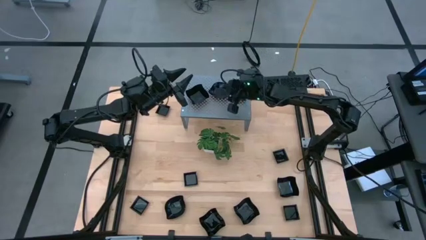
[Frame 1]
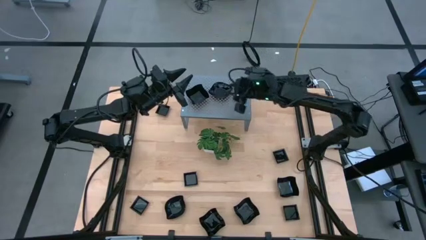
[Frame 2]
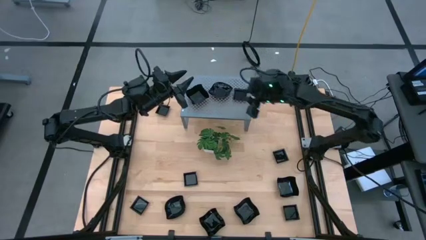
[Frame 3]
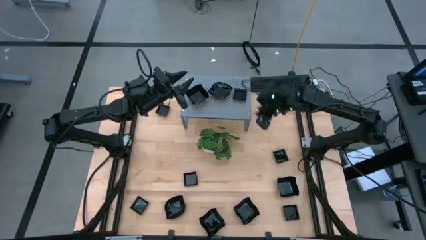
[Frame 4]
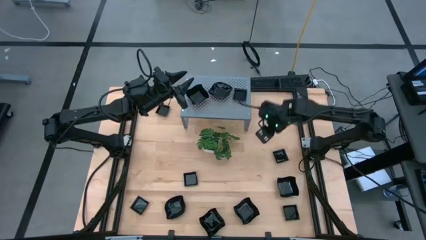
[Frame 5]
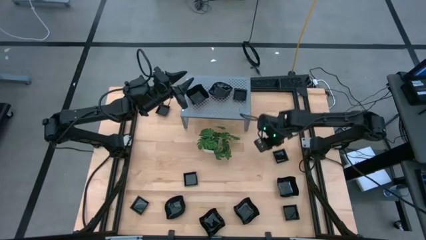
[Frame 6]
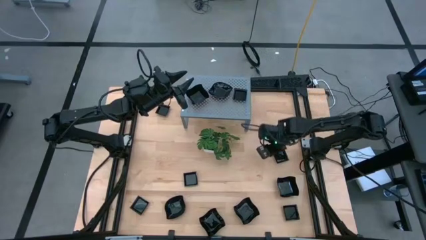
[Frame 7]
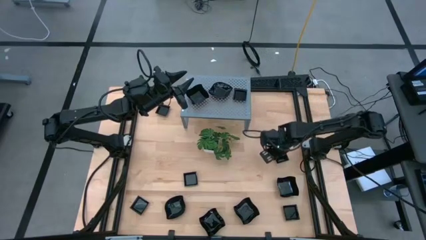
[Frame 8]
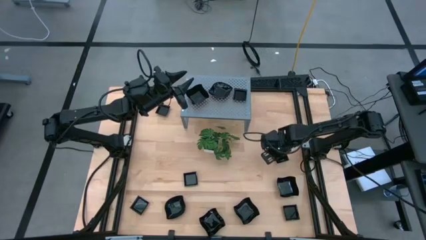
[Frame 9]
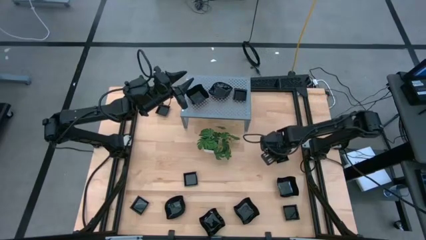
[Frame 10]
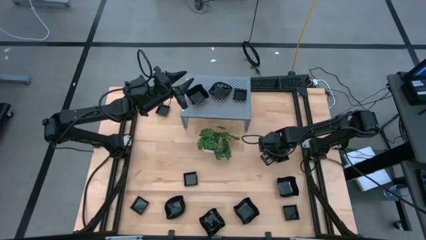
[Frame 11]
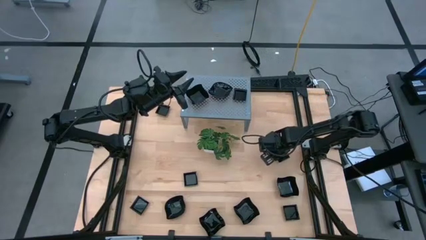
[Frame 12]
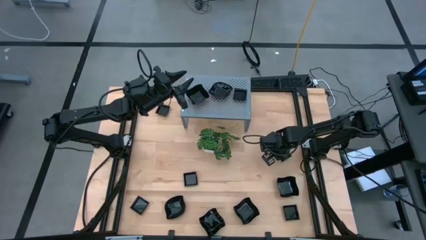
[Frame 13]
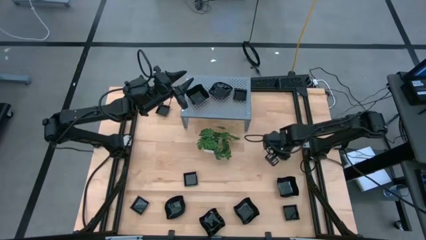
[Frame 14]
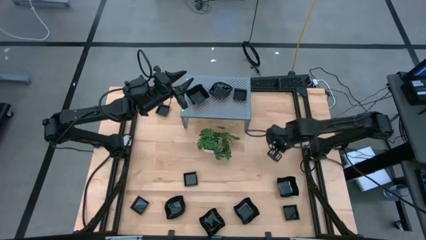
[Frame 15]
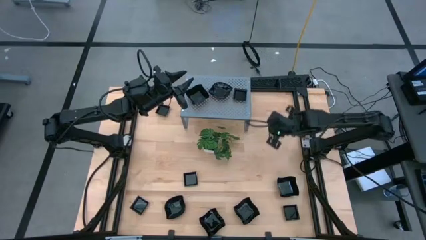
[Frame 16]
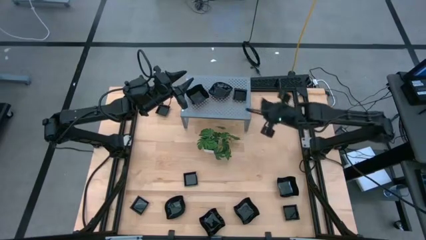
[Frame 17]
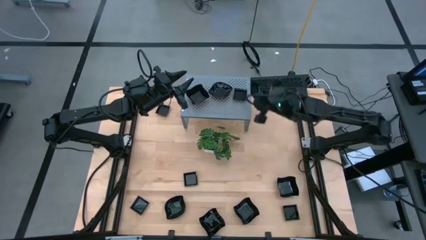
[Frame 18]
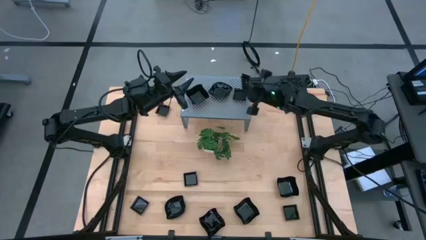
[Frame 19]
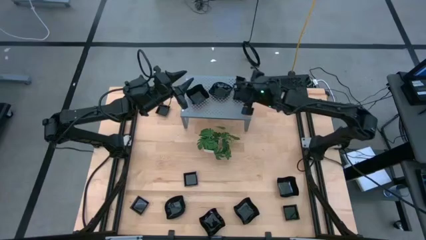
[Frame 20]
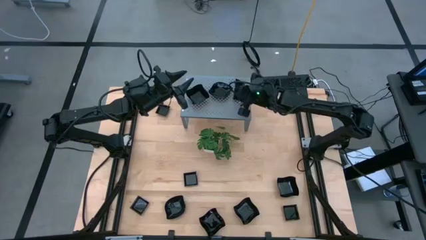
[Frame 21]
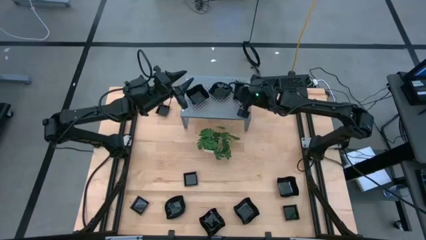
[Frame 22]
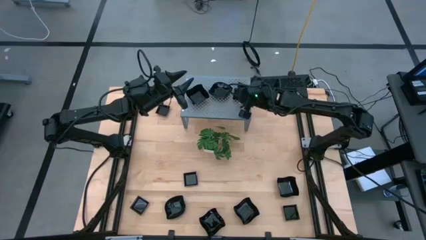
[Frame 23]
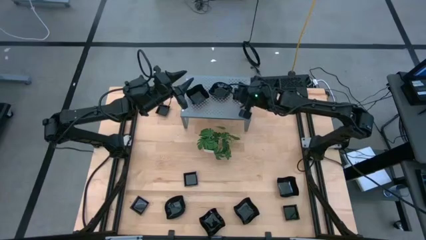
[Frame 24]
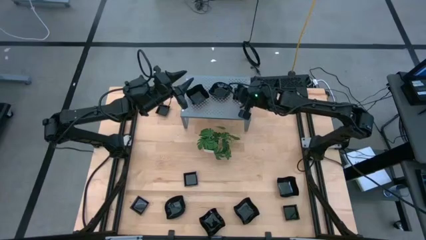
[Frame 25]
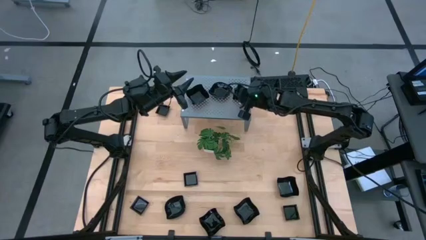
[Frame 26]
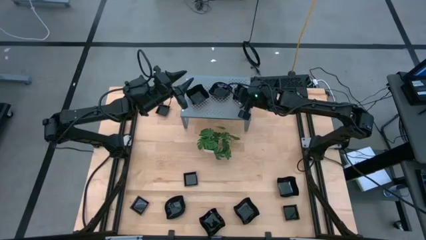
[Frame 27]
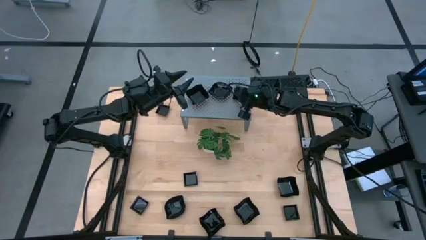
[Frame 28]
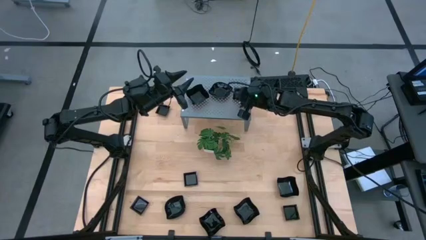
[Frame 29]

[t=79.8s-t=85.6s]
Task: Pick & Place Mini shaped plates
Stack the square plate on top of the square plate on the shelf

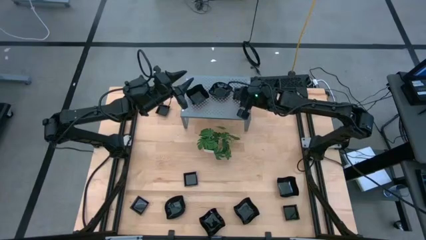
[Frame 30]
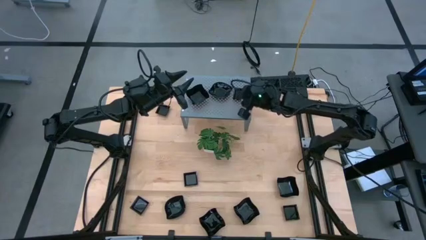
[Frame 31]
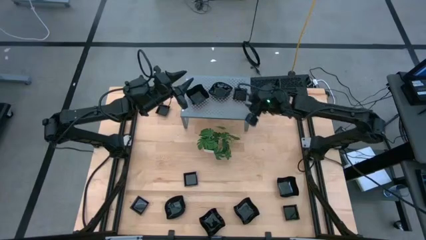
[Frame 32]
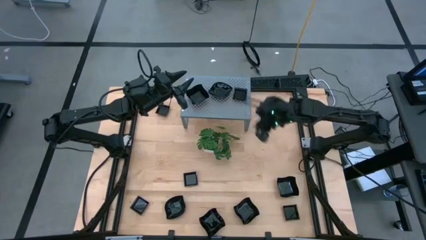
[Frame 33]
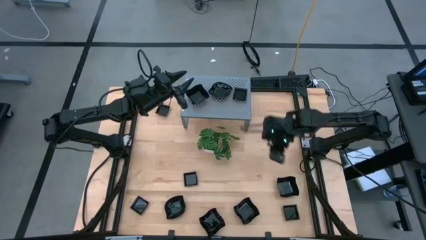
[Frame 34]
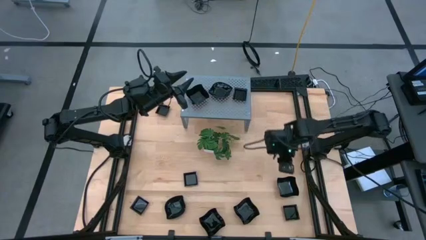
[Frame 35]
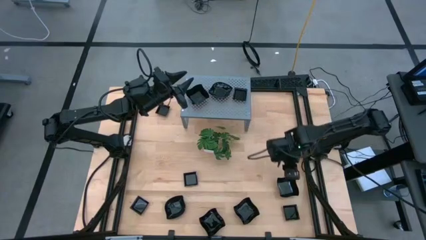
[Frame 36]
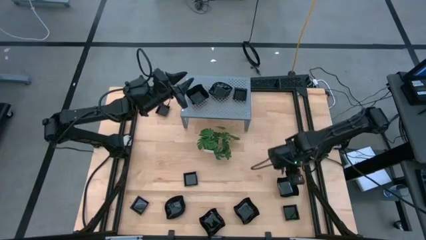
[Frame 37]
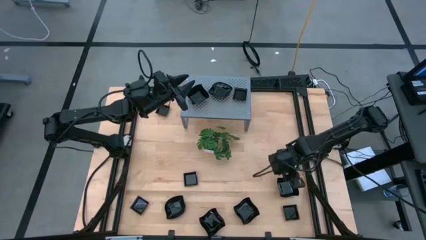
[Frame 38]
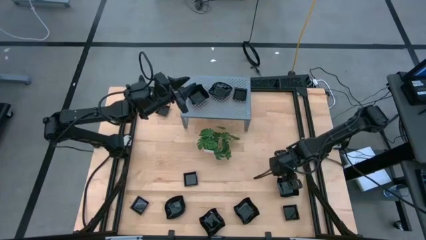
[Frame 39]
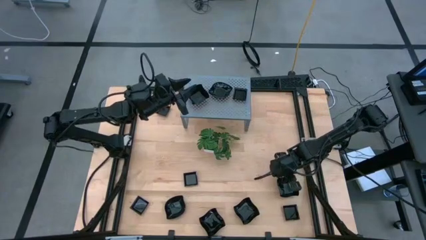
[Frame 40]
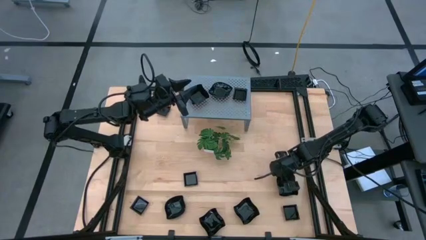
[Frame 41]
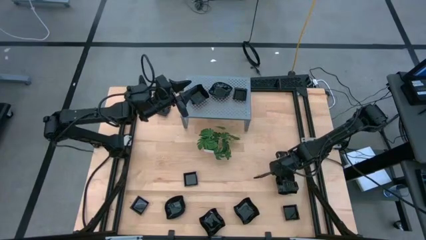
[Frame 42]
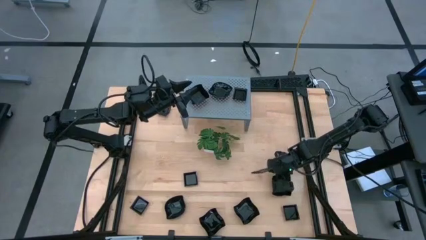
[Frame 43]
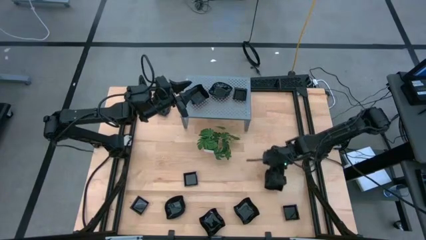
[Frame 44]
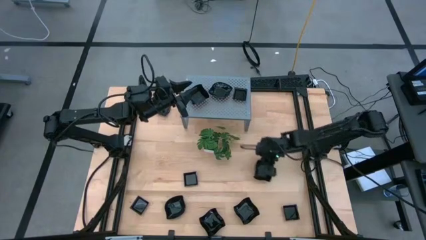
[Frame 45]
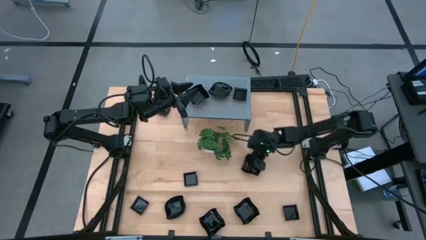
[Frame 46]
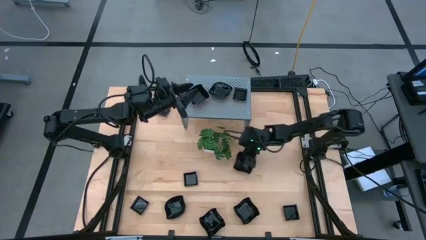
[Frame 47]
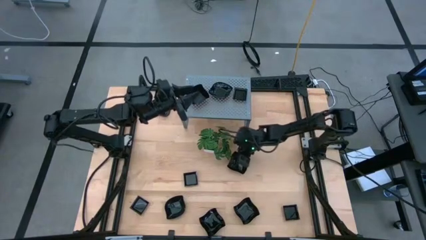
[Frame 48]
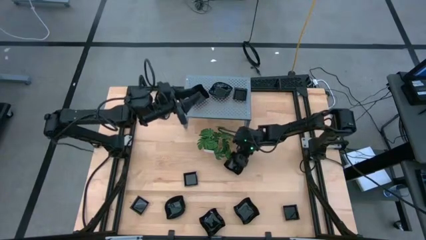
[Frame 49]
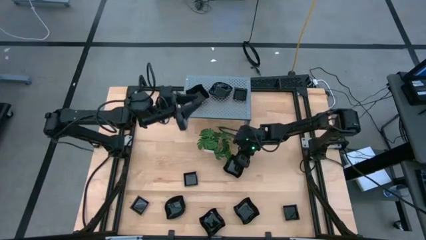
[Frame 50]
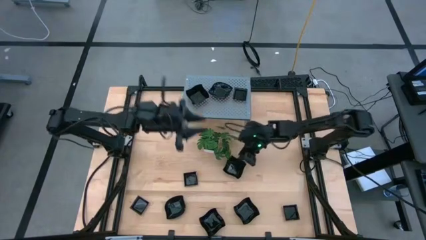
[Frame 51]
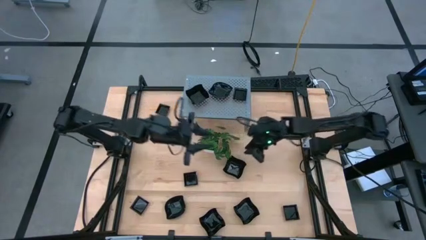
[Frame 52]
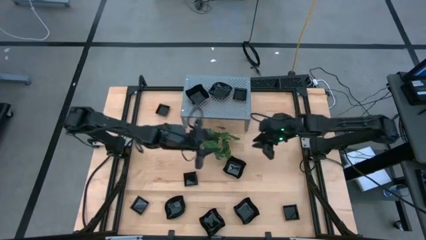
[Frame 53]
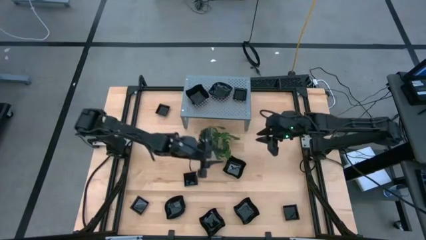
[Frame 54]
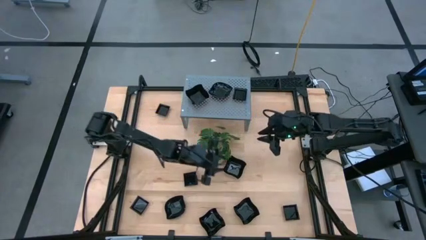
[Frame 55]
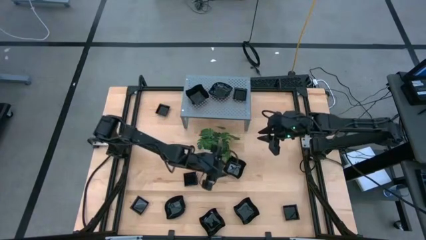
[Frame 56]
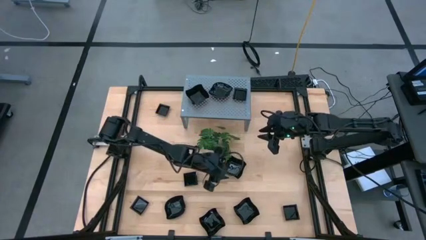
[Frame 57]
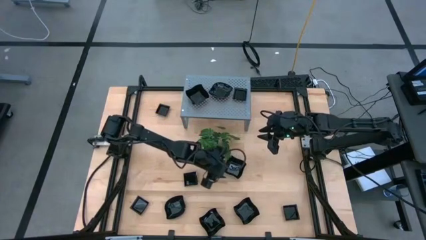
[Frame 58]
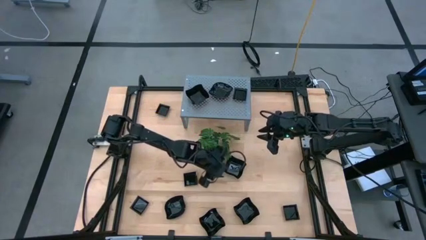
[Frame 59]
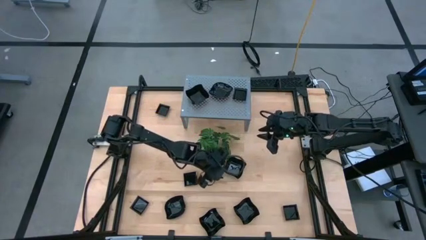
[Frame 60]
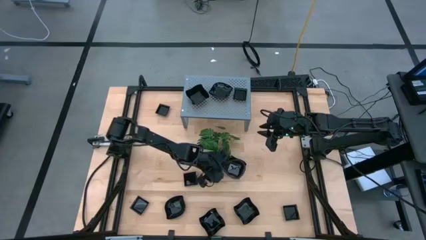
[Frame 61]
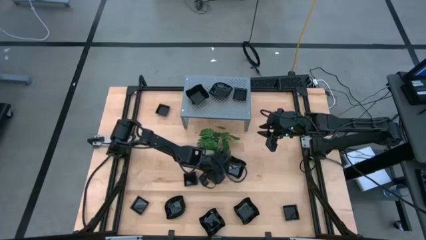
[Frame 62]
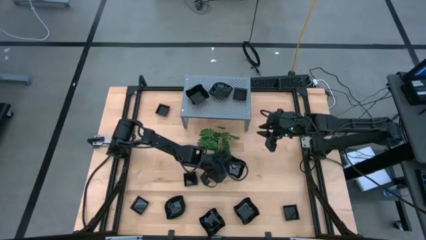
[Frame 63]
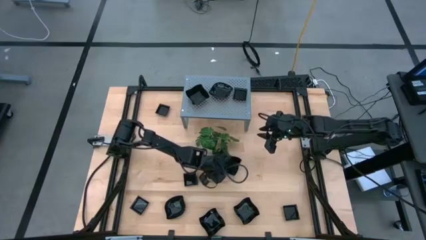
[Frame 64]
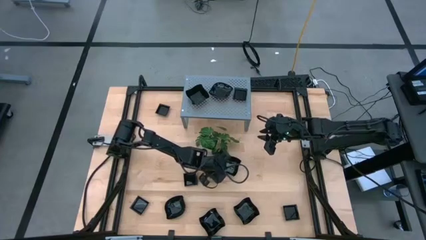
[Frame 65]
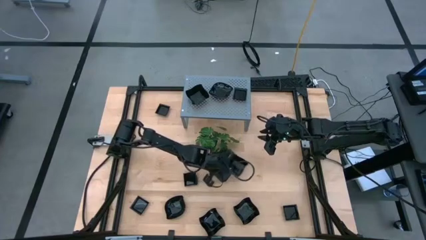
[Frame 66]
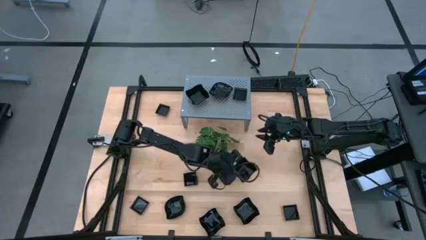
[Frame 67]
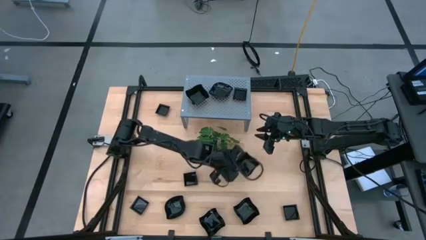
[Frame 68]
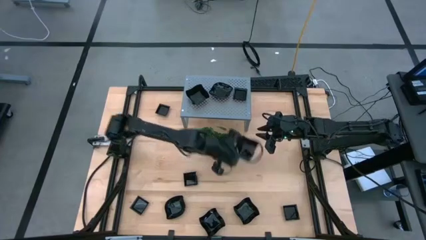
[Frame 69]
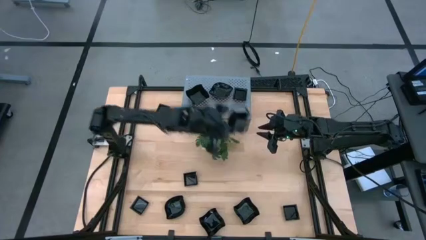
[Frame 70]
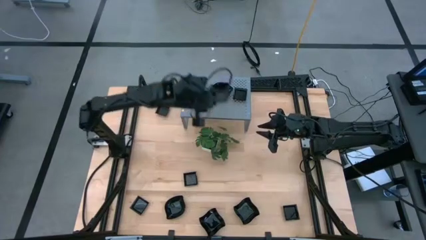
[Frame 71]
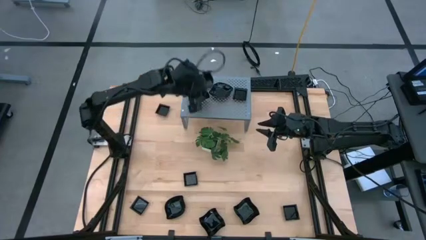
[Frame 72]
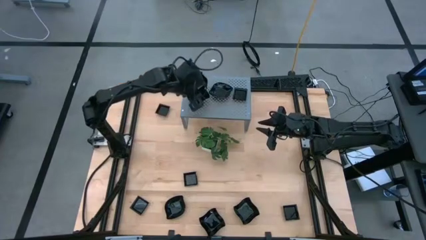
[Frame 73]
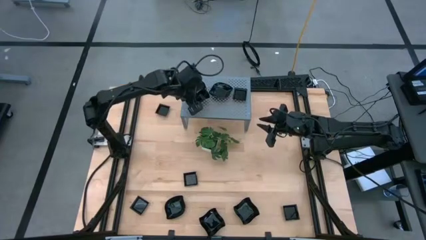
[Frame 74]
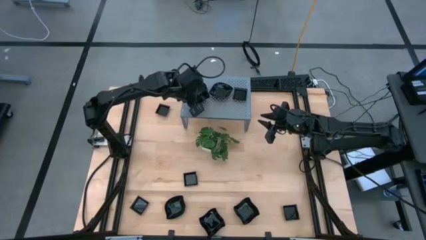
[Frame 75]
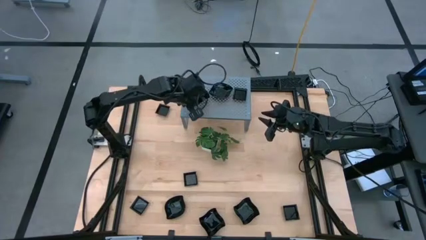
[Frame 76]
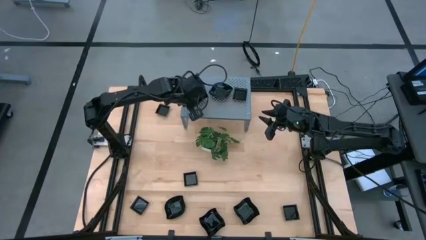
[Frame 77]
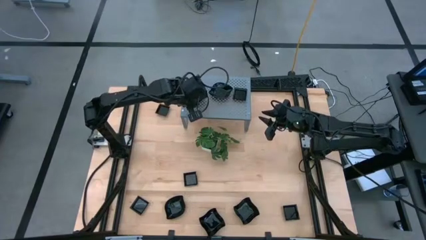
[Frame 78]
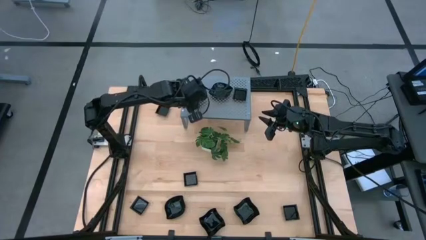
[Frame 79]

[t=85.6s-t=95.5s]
Stack the distorted square plate on top of the distorted square plate on the shelf
